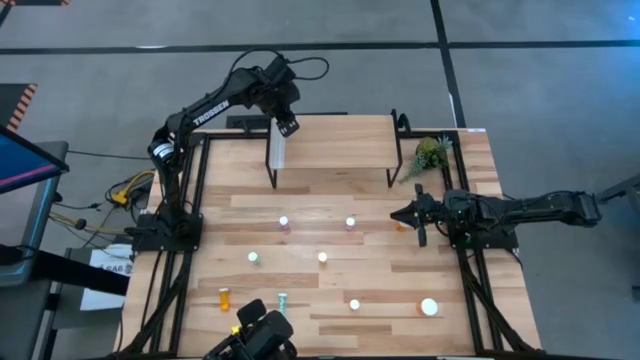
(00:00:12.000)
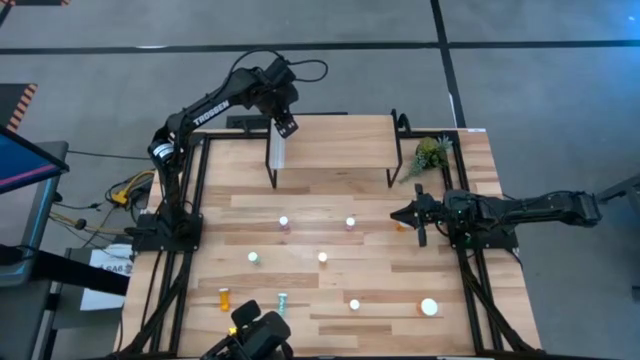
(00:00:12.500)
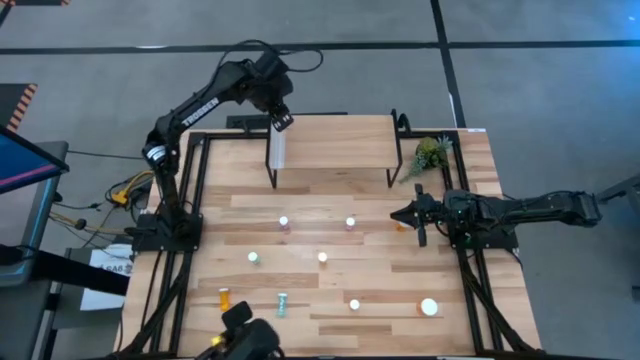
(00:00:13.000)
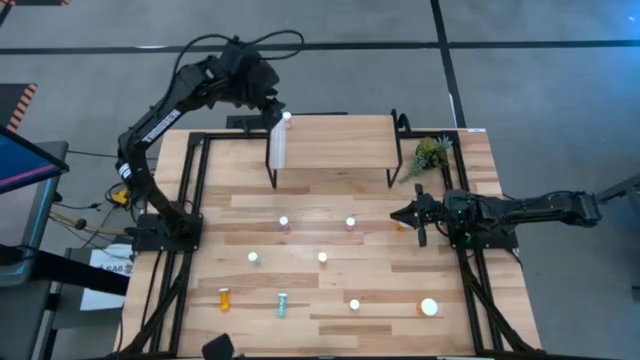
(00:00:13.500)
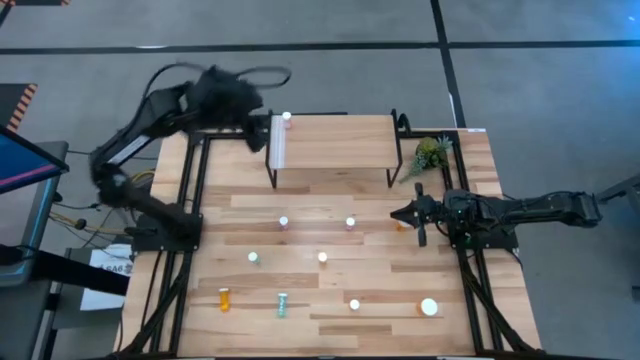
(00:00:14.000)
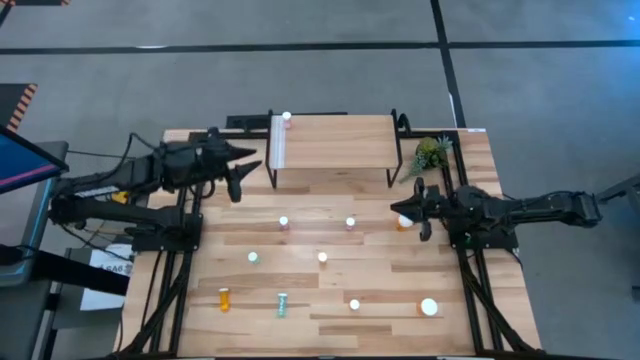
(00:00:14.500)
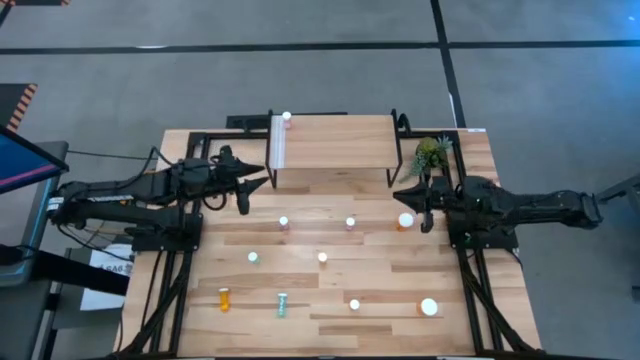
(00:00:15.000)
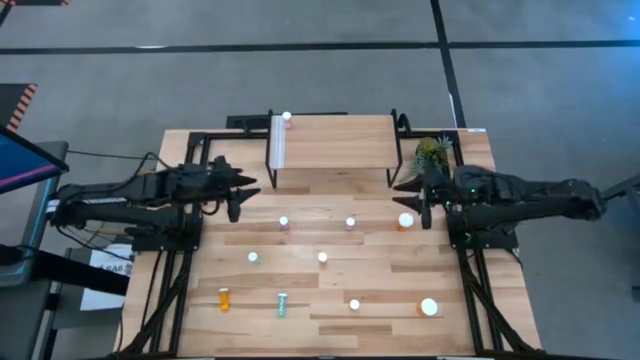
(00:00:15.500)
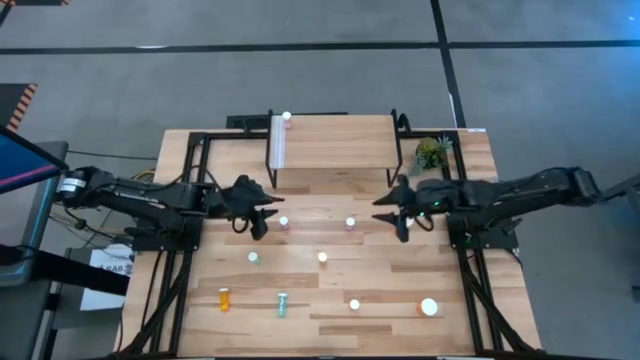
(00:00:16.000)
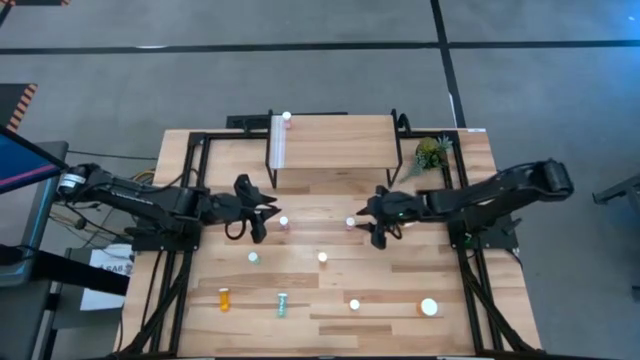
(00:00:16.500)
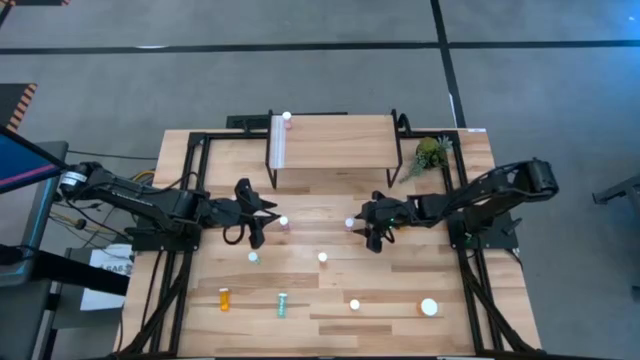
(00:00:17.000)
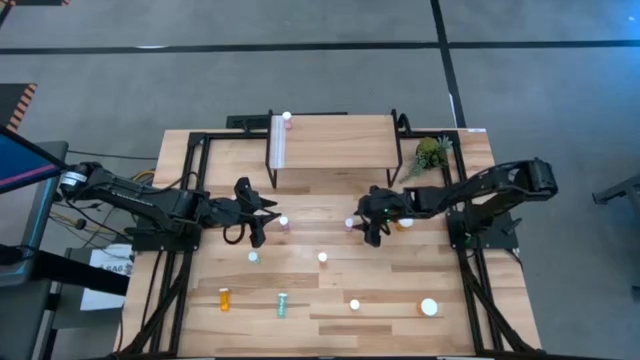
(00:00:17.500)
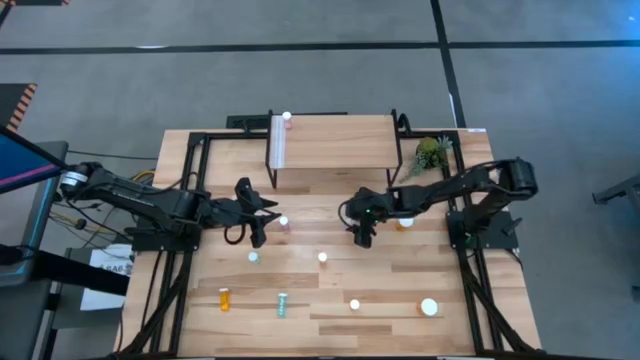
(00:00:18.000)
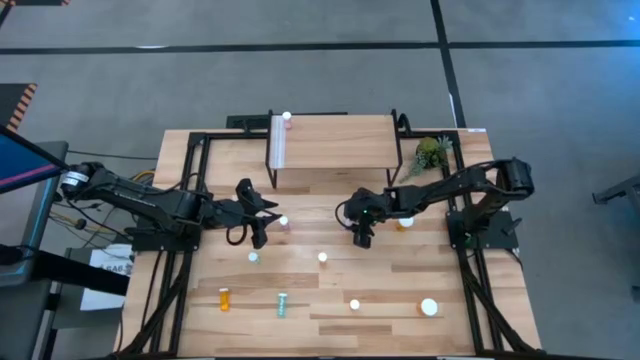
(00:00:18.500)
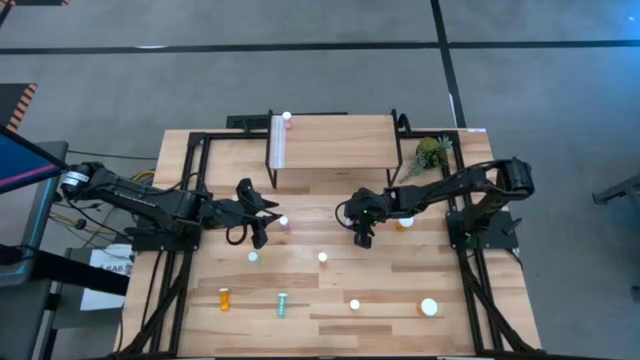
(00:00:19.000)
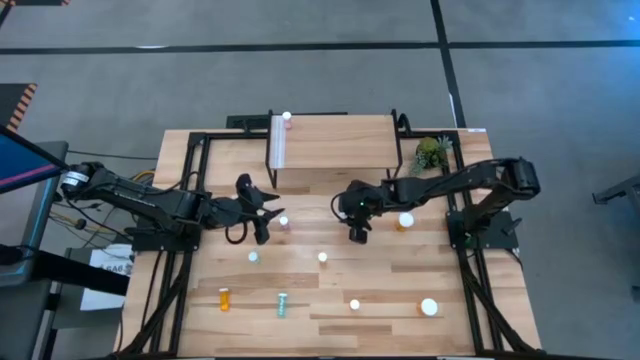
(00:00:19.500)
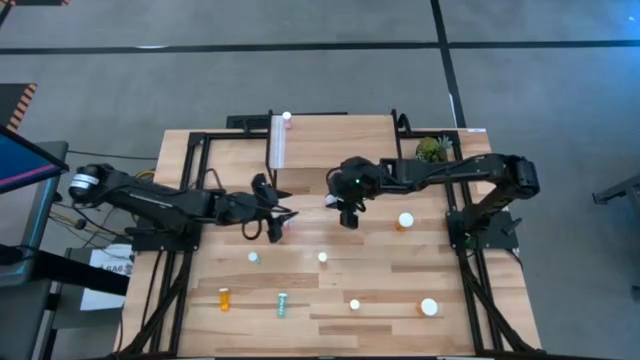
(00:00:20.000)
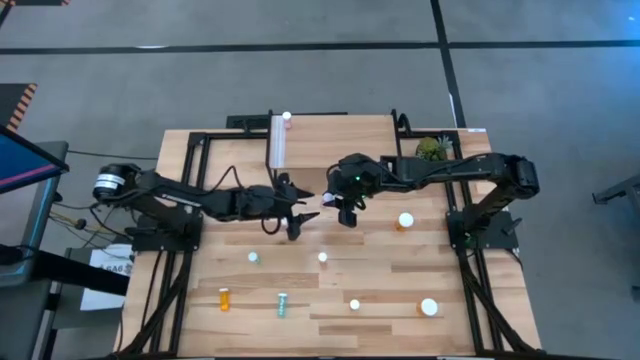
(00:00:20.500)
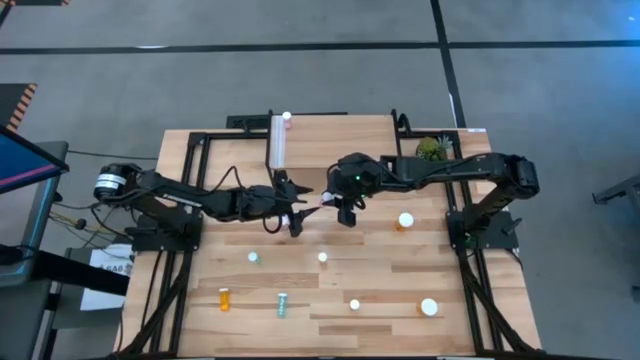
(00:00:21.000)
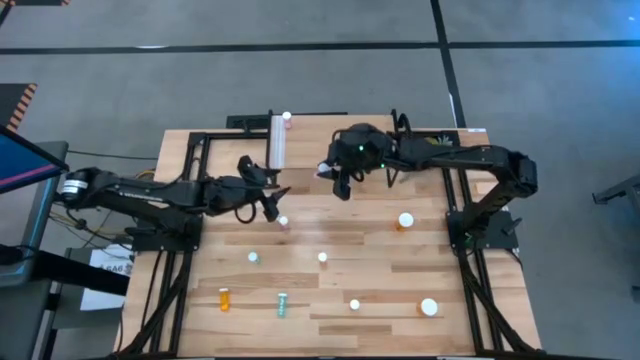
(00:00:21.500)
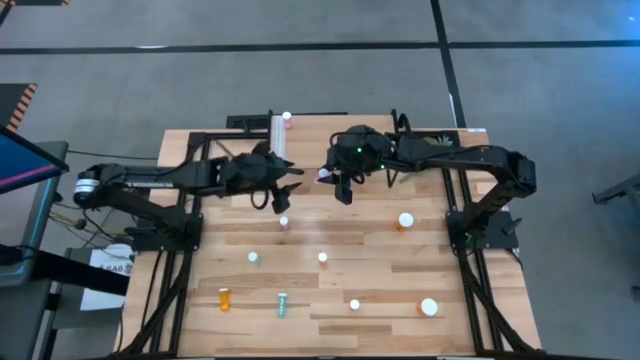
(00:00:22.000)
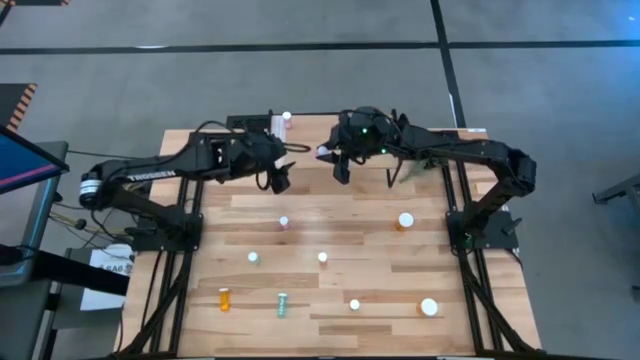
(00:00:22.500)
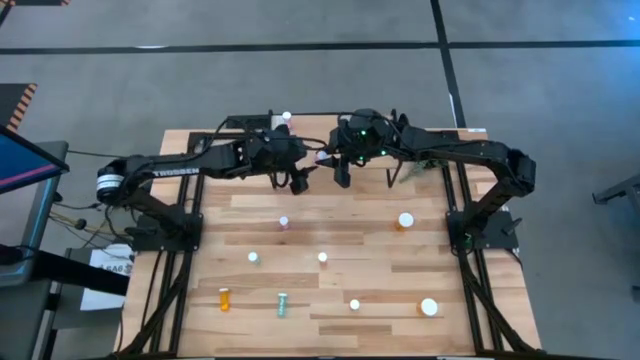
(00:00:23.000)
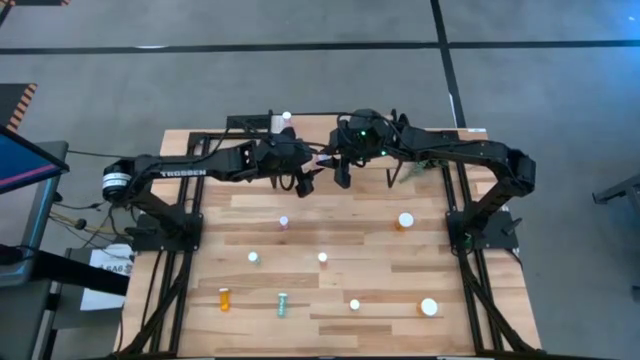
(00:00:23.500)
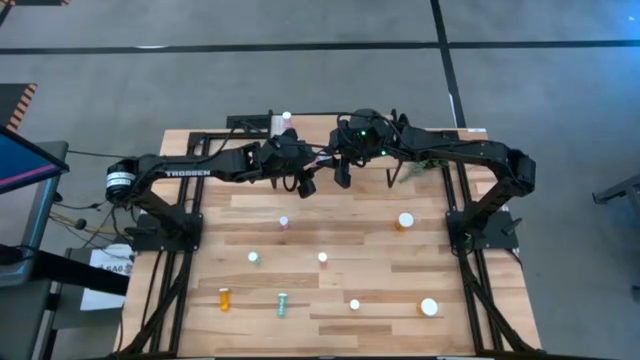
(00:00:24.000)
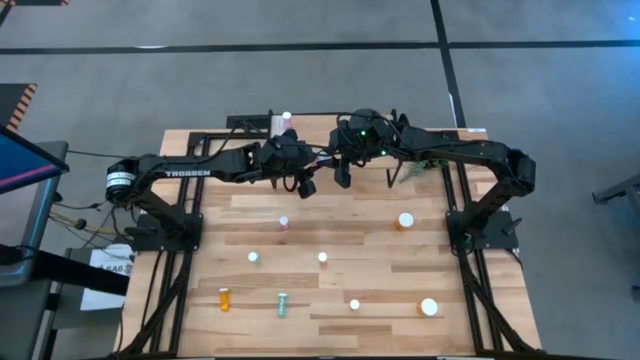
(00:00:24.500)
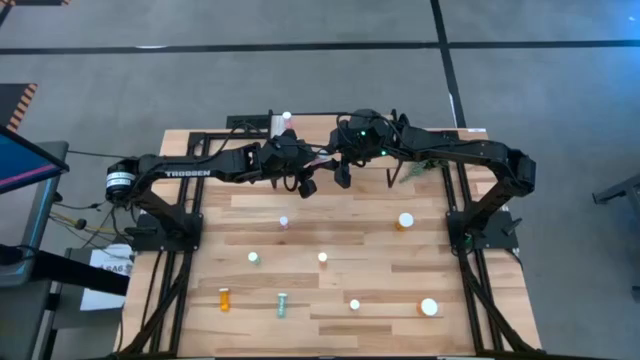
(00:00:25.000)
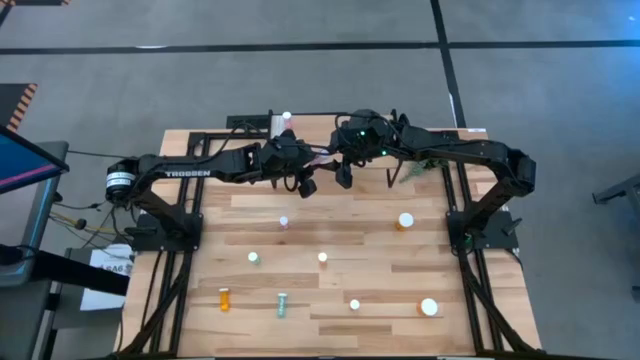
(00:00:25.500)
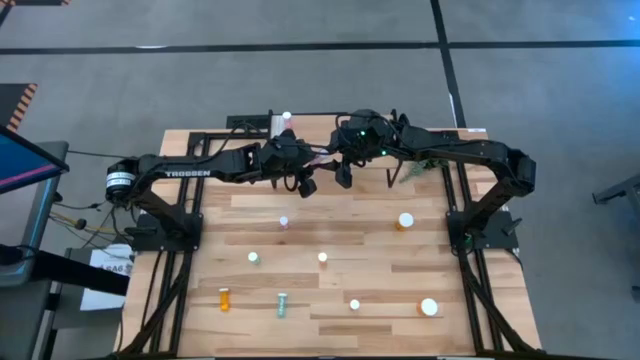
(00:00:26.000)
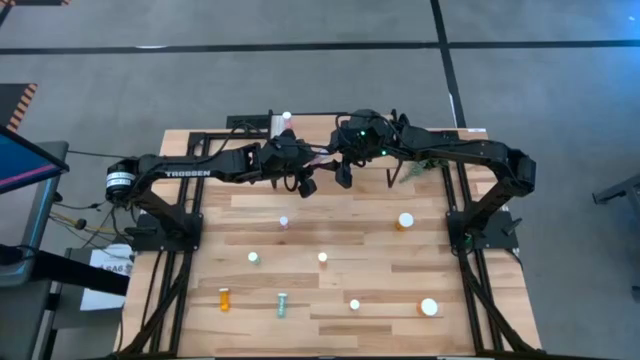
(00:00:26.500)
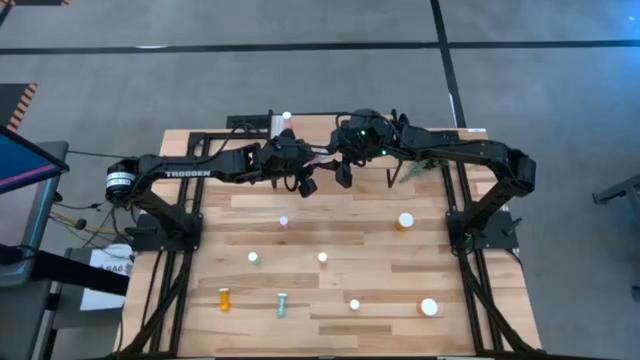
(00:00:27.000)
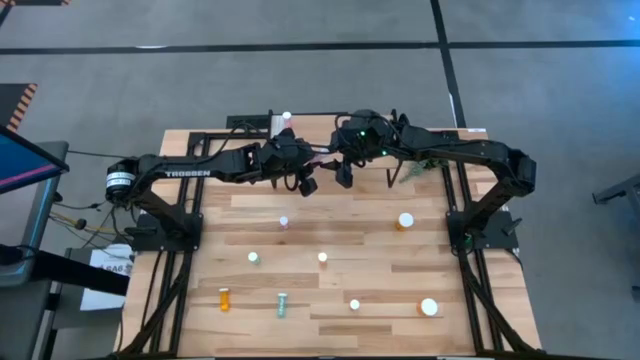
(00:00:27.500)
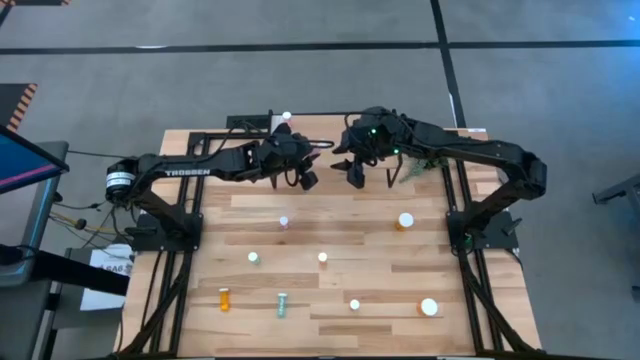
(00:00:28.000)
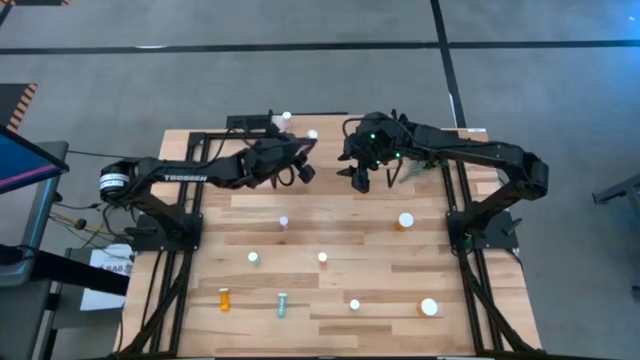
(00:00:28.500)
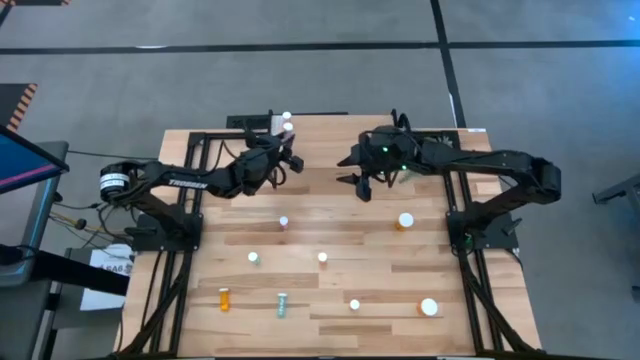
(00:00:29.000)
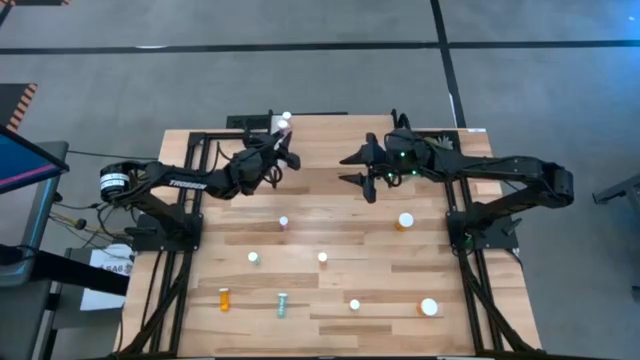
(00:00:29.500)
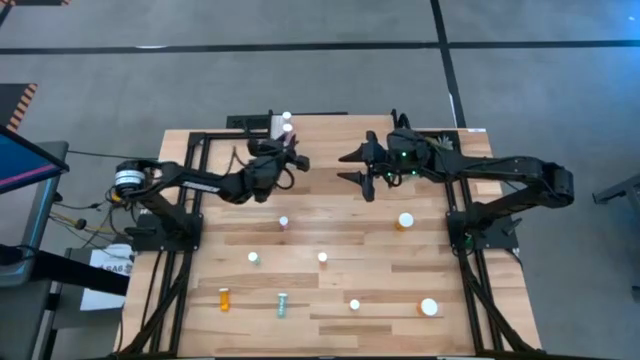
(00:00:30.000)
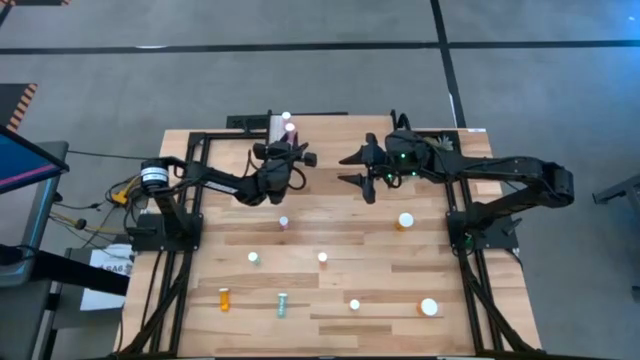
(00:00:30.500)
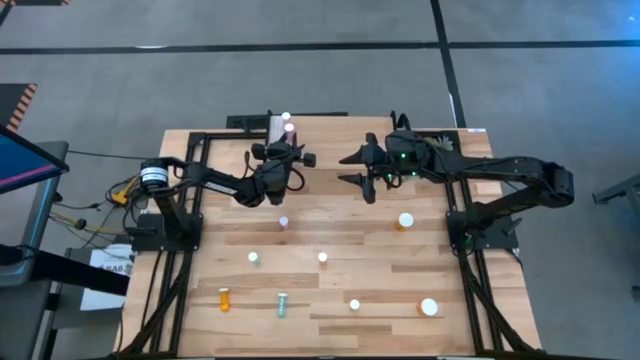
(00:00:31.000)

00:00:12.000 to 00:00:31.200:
Task: Pick and place medicine bottles onto shelf by color
Put the right pink pill bottle on the shelf aligned with the other pink pill bottle
